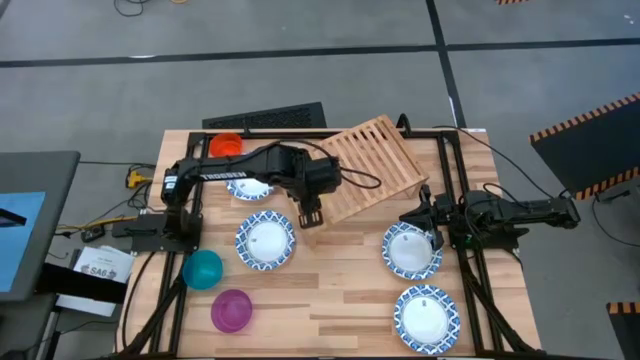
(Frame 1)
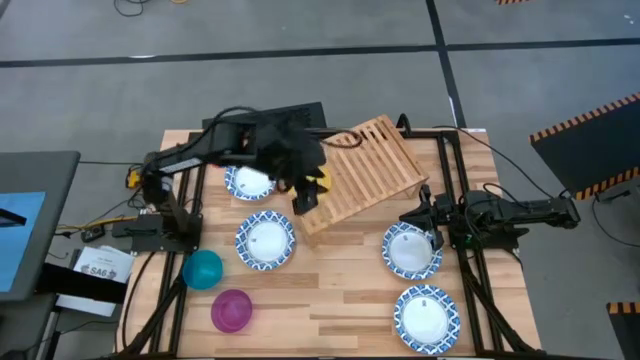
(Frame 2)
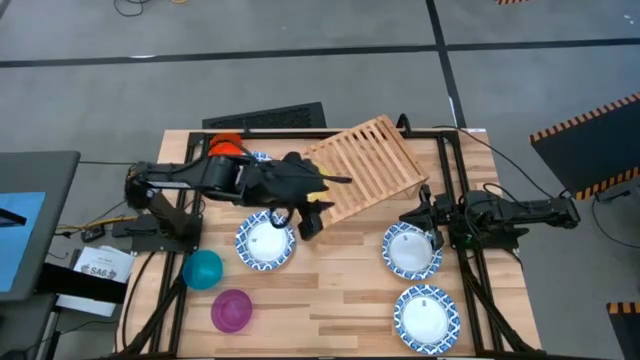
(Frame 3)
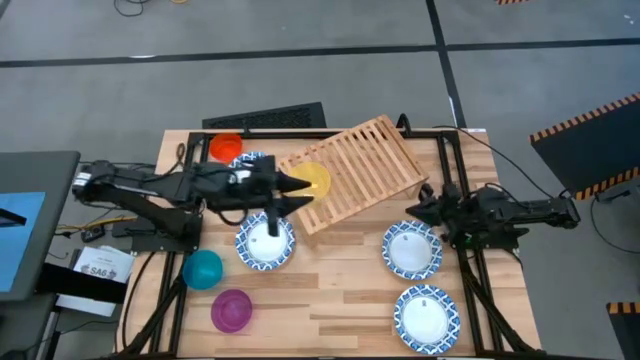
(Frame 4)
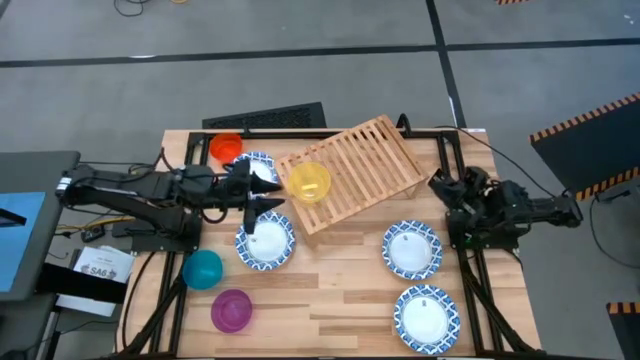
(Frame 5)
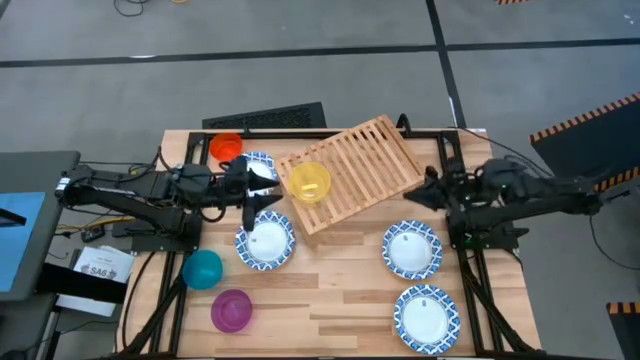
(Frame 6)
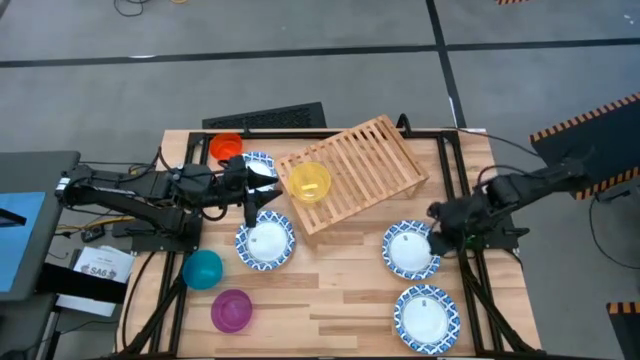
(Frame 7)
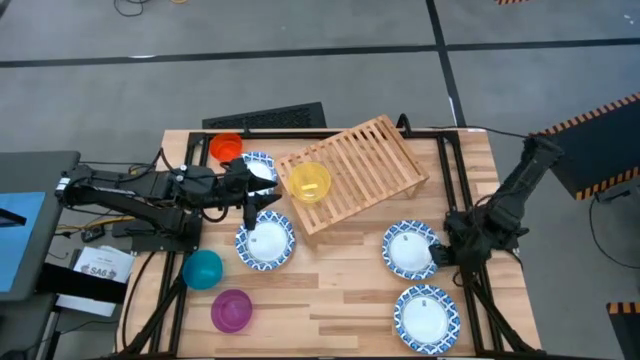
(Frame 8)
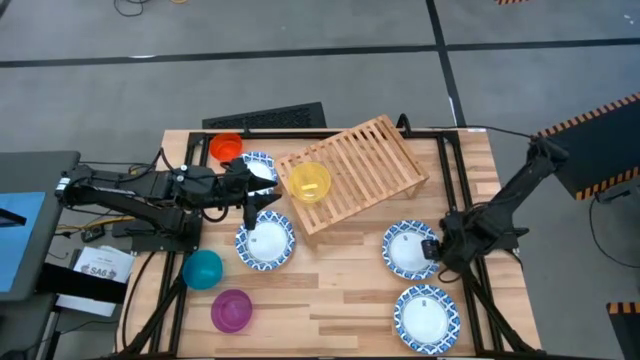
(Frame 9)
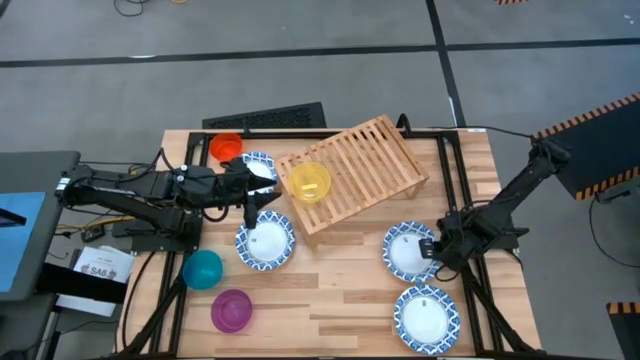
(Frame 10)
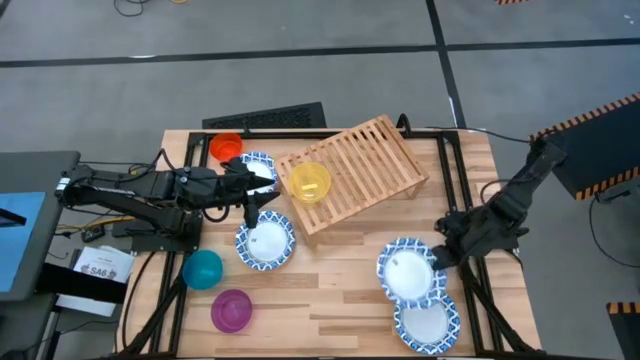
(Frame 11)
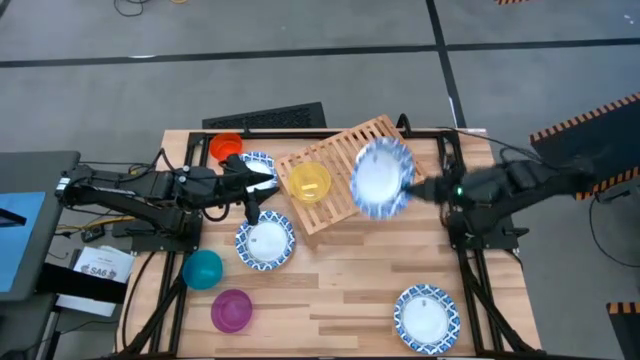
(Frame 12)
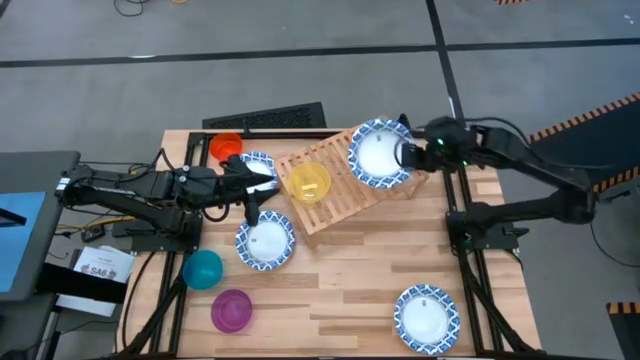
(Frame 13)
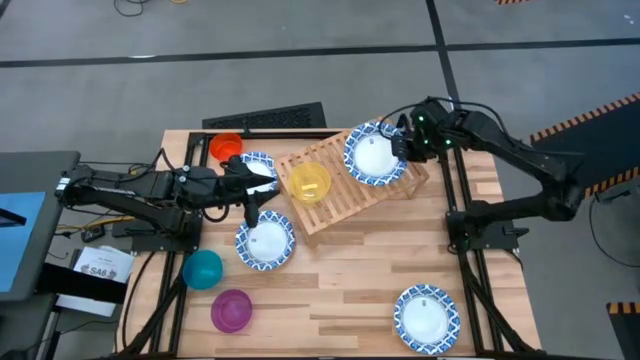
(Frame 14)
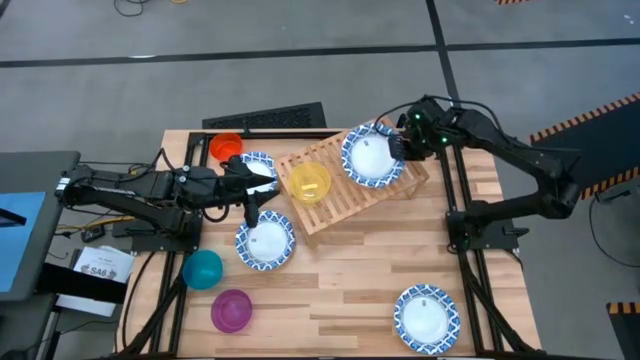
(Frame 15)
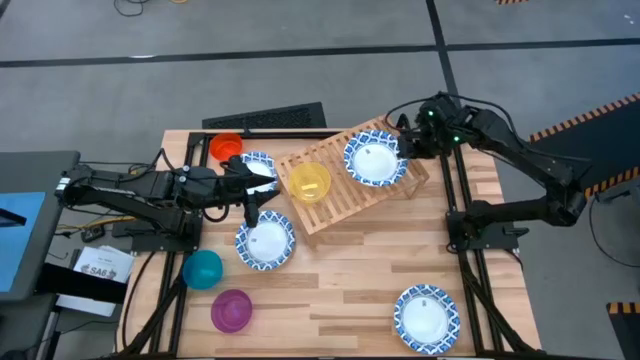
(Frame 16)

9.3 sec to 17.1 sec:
Task: Place and stack bowls onto a shelf
Put the middle right white patterned bowl on the shelf

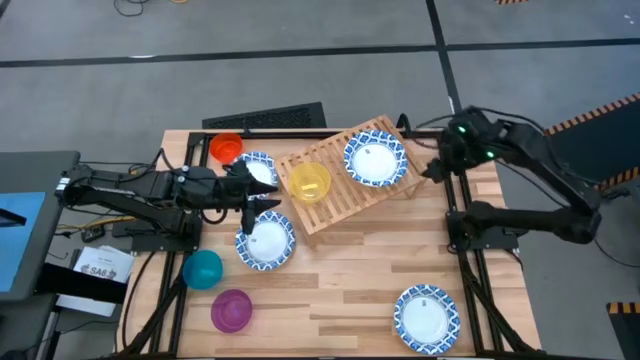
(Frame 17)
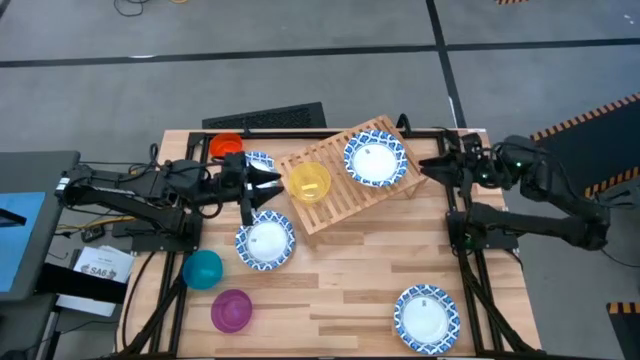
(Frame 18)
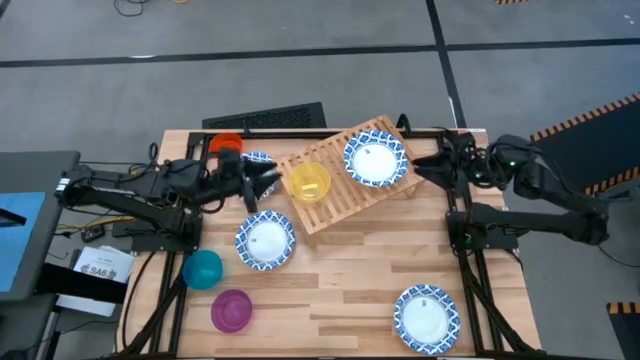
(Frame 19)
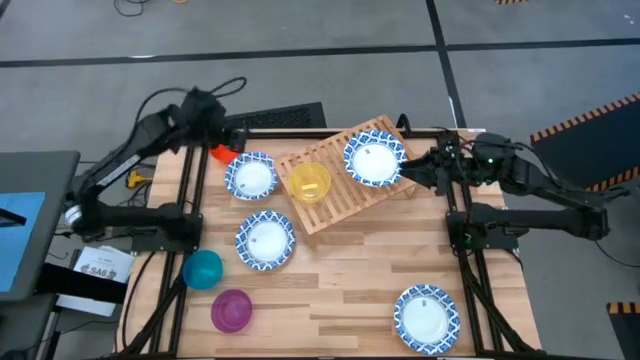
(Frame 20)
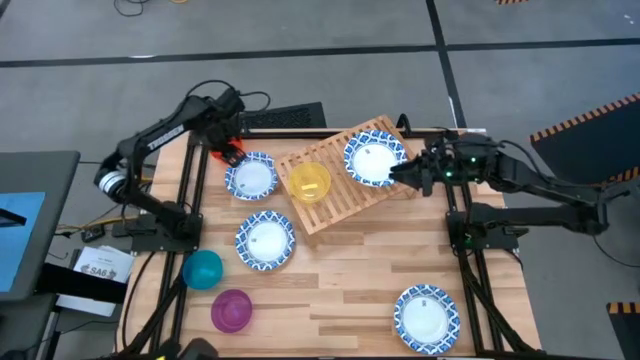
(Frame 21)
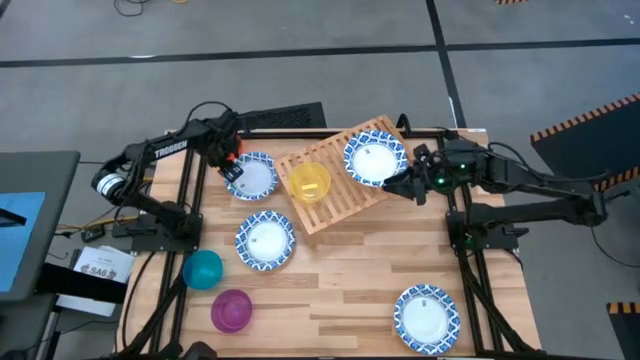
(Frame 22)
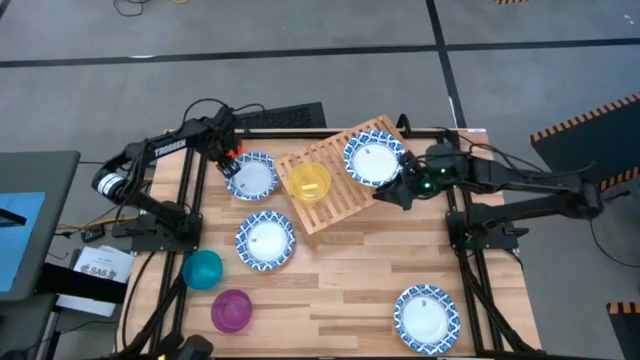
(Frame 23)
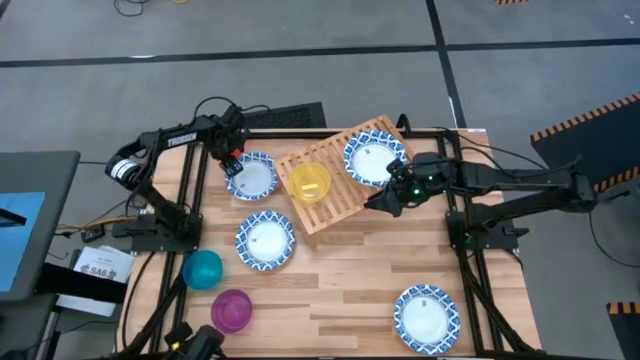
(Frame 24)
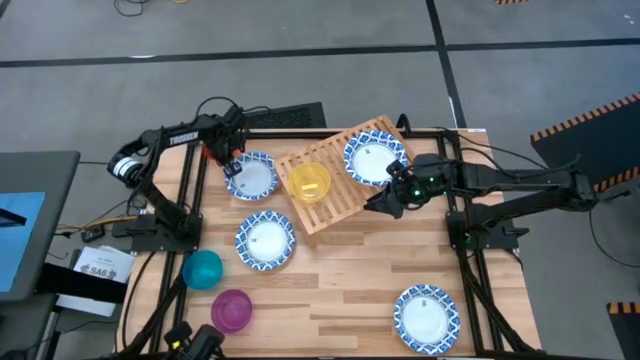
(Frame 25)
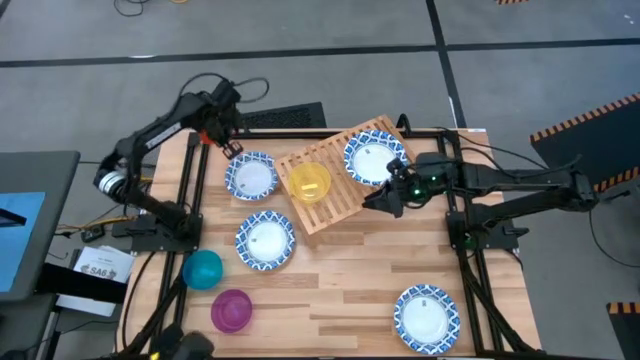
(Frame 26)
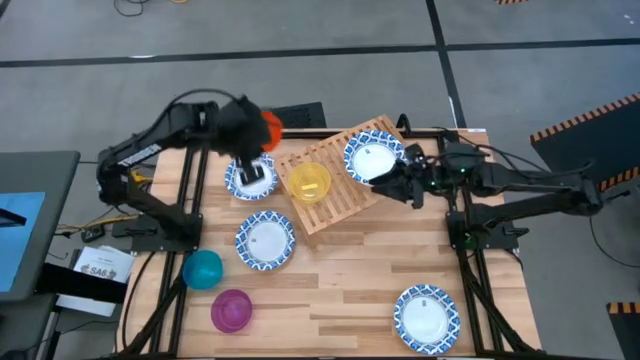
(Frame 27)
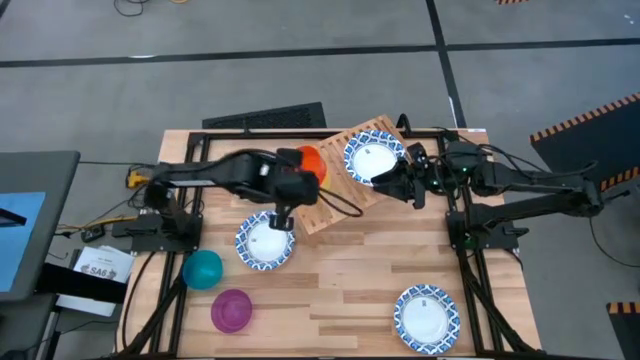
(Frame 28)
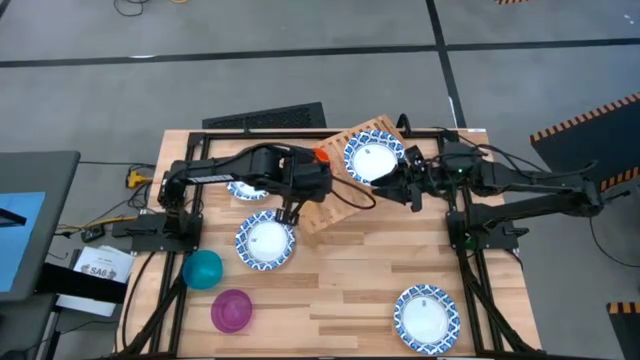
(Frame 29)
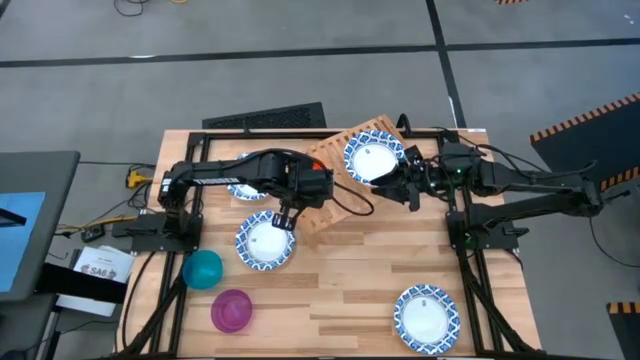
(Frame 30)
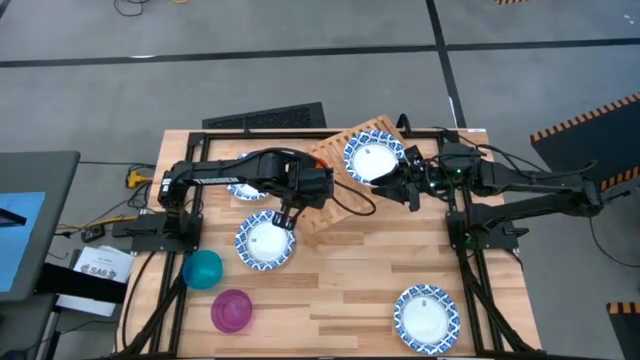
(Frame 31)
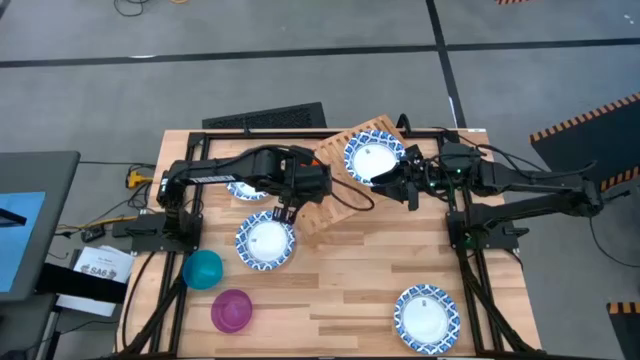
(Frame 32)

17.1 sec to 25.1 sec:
Stack the orange bowl on top of the yellow bowl on the shelf

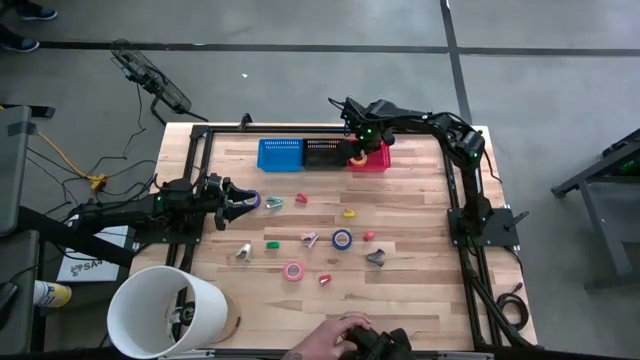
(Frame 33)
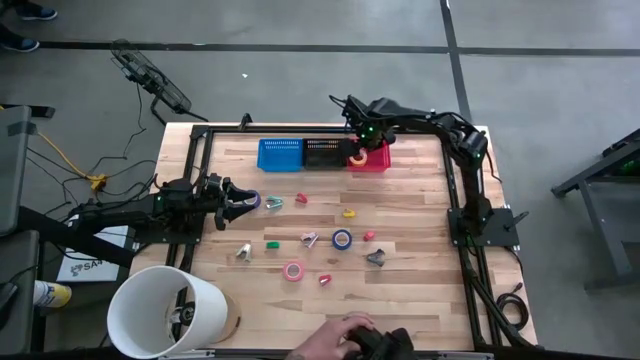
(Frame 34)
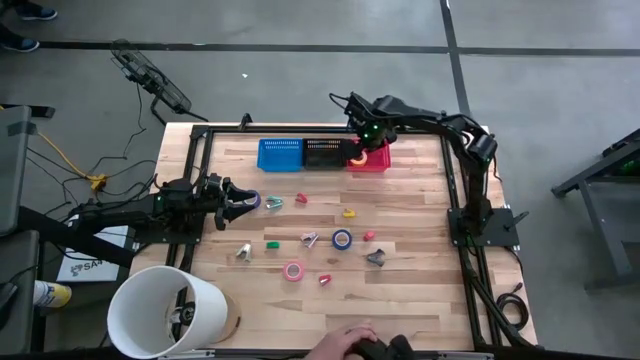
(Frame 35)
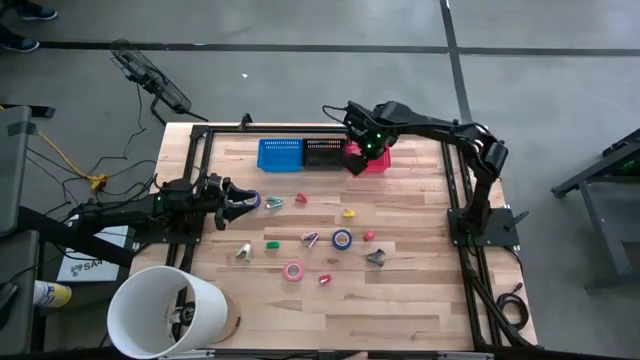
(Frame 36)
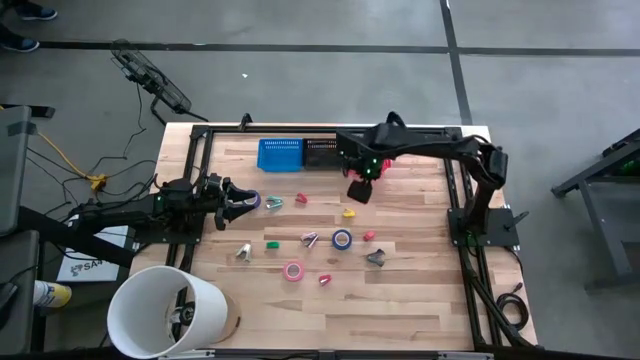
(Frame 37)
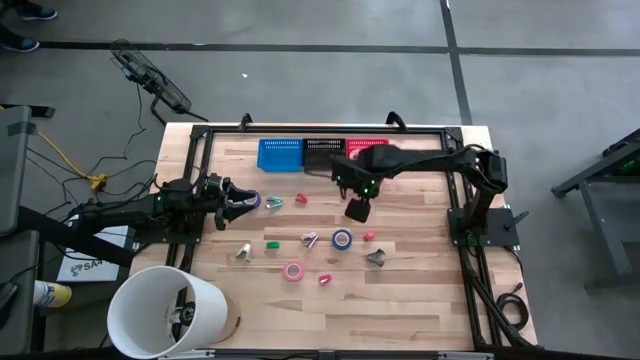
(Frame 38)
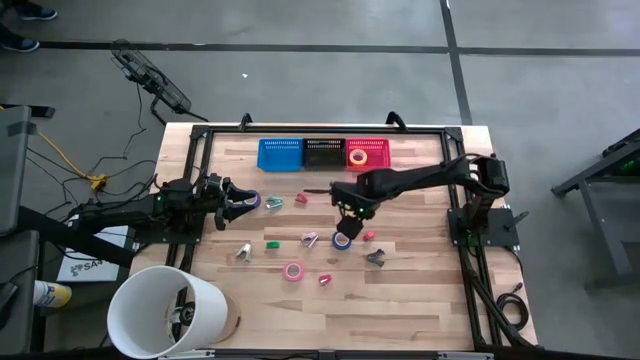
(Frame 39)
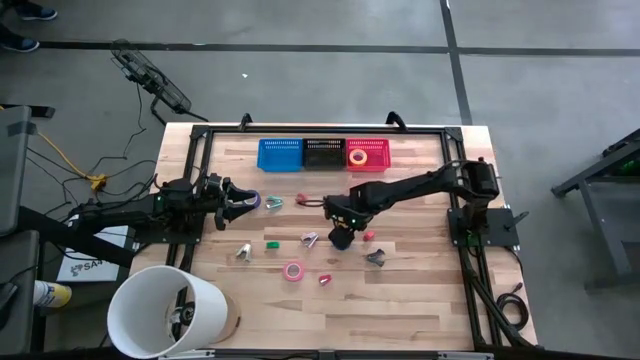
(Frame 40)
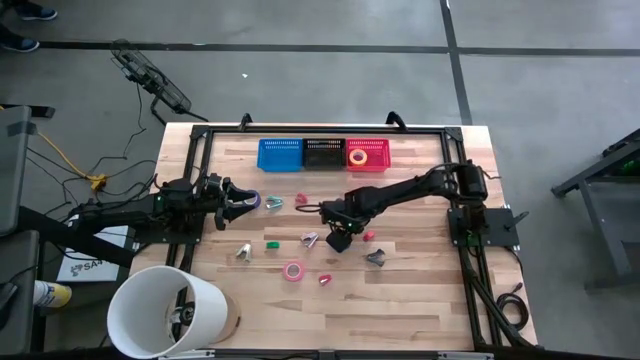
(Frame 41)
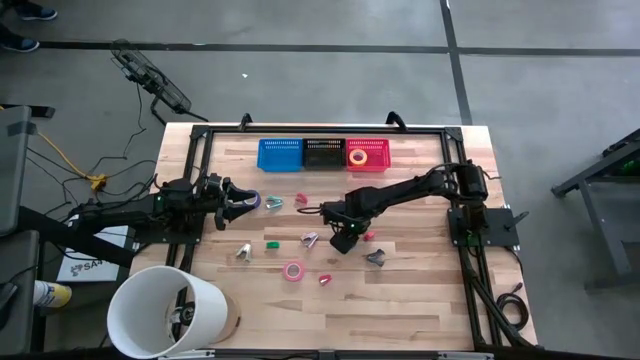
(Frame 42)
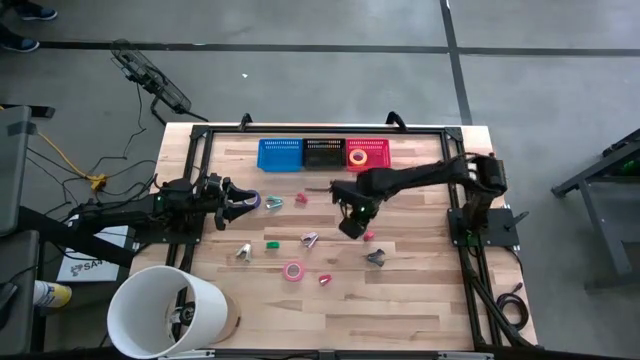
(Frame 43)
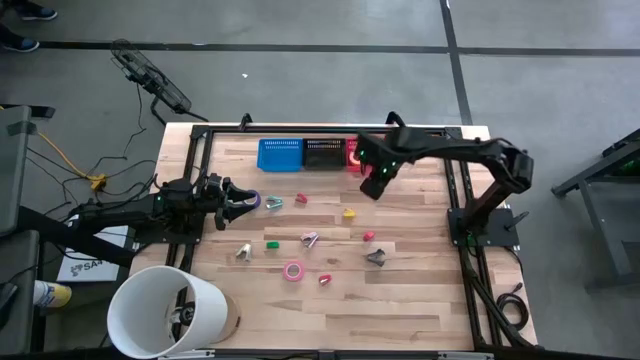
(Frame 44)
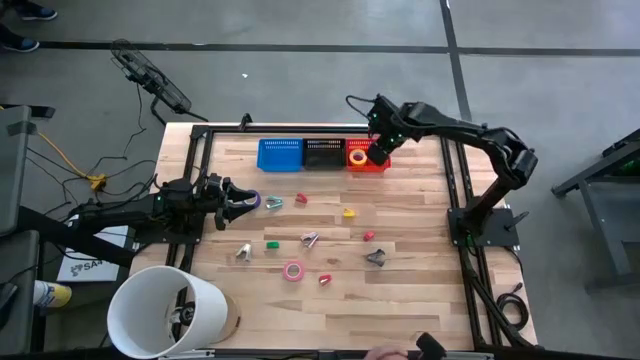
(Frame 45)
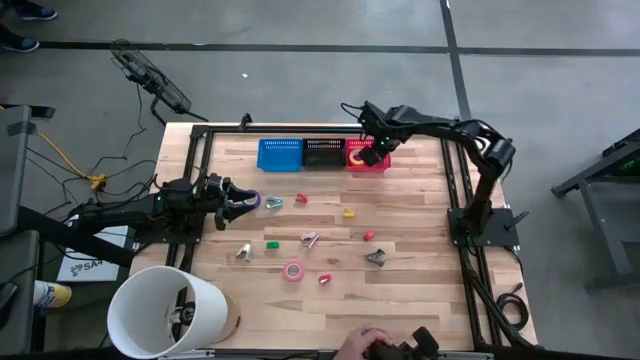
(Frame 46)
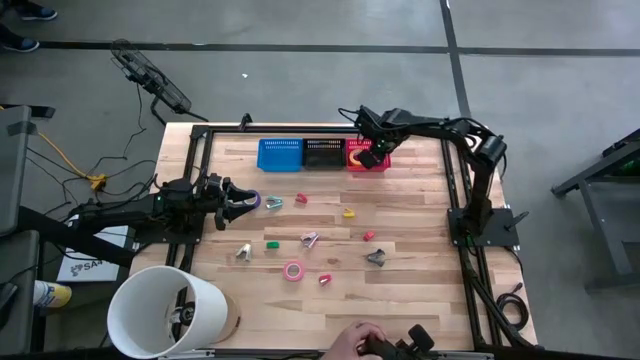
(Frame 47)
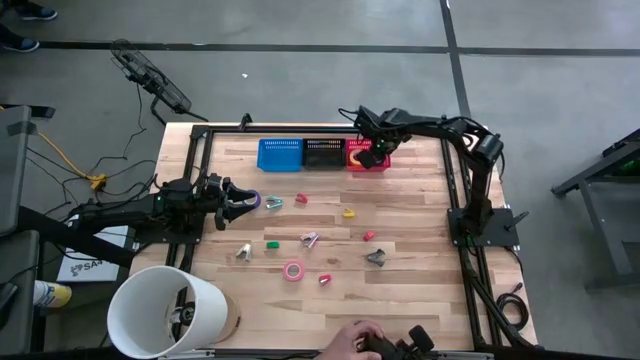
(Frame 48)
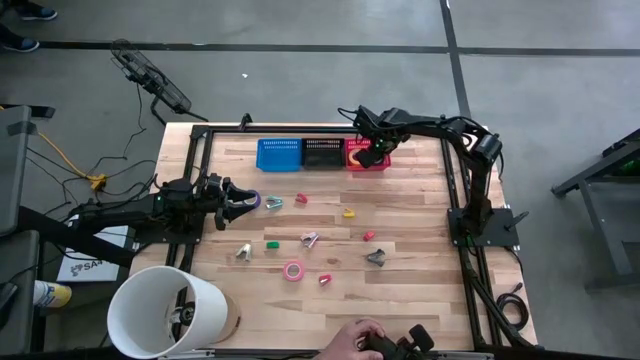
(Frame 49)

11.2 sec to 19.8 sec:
Task: Pick and place Stapler, Stapler remover, tape
Put the bottom blue tape into the red bin
